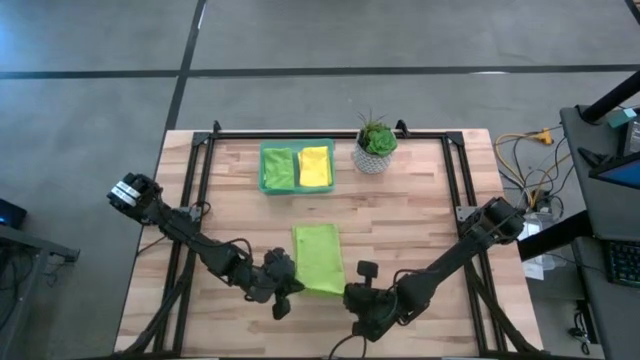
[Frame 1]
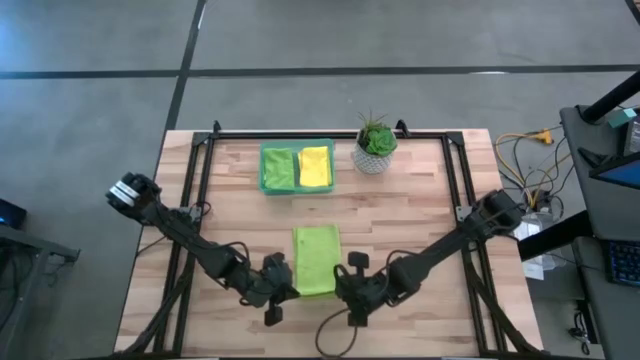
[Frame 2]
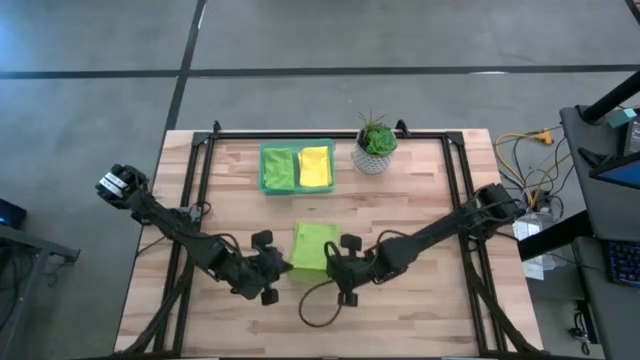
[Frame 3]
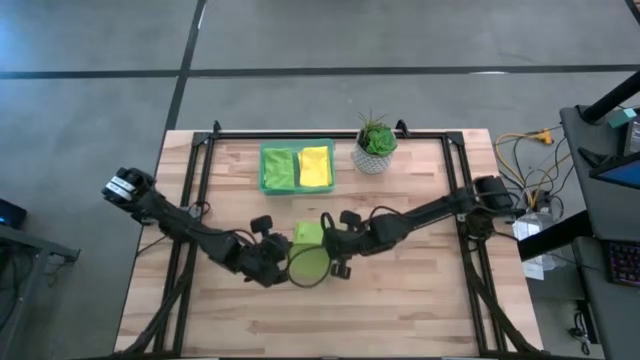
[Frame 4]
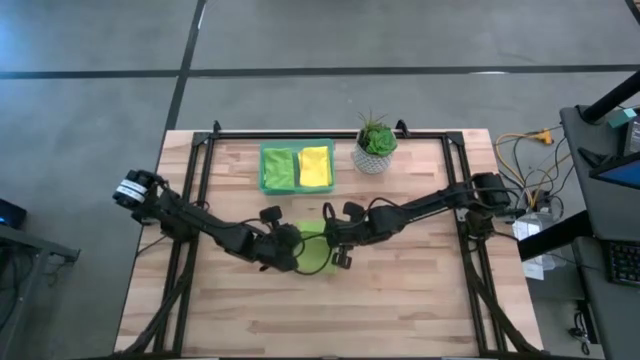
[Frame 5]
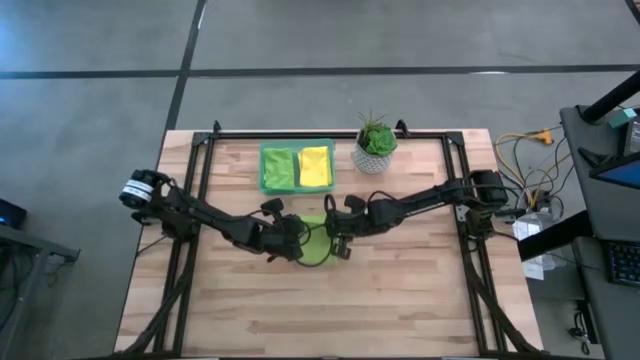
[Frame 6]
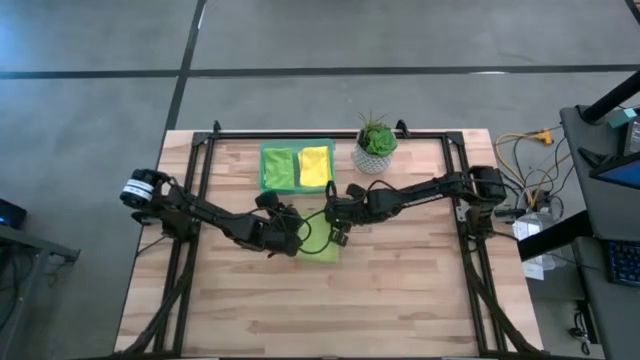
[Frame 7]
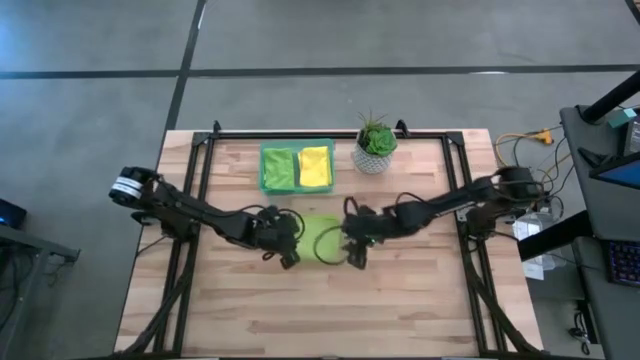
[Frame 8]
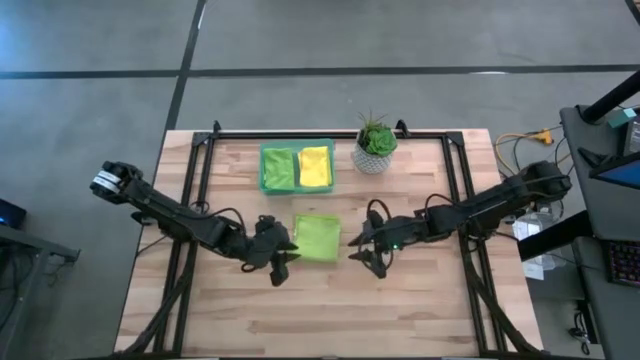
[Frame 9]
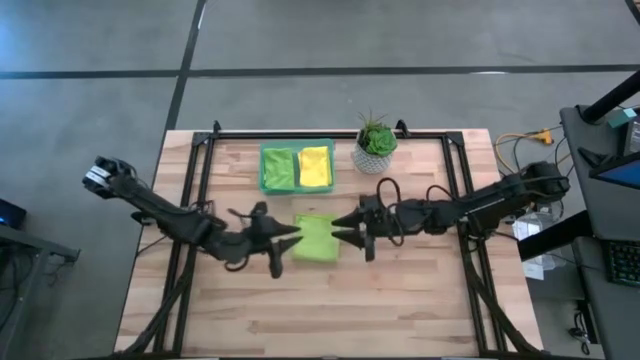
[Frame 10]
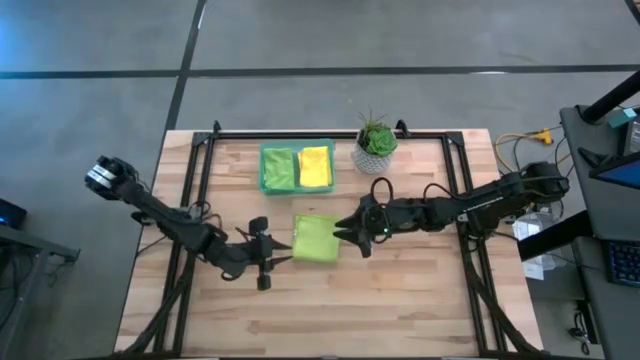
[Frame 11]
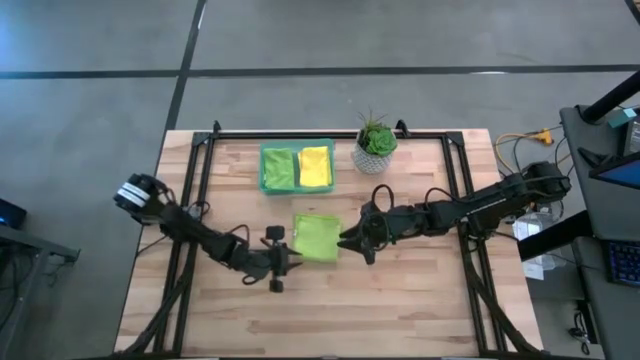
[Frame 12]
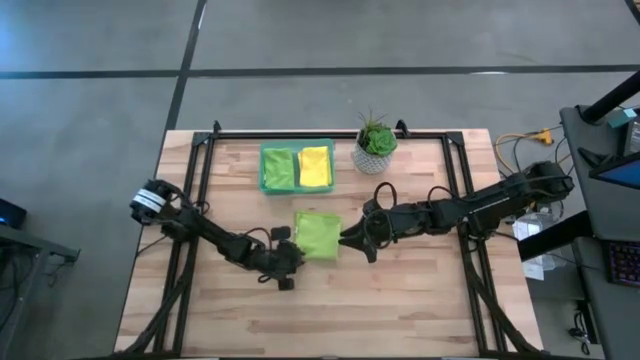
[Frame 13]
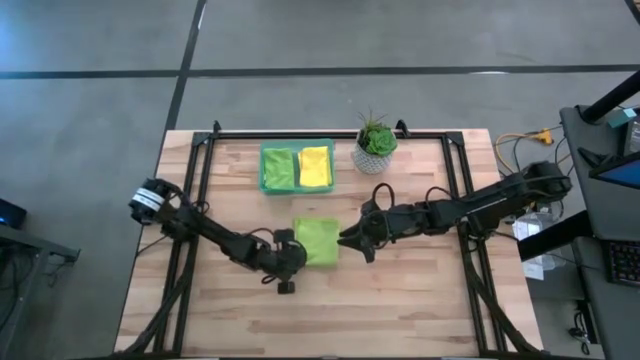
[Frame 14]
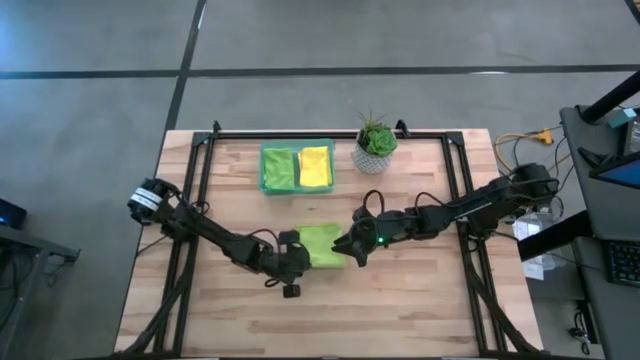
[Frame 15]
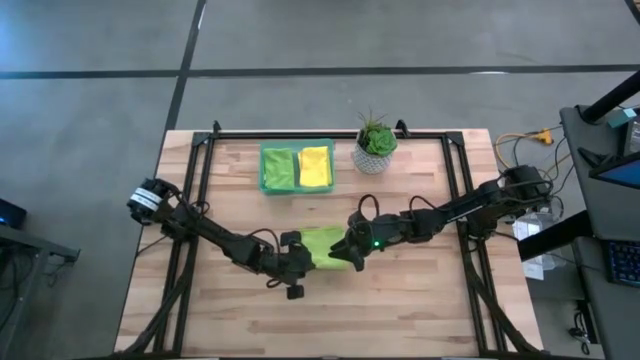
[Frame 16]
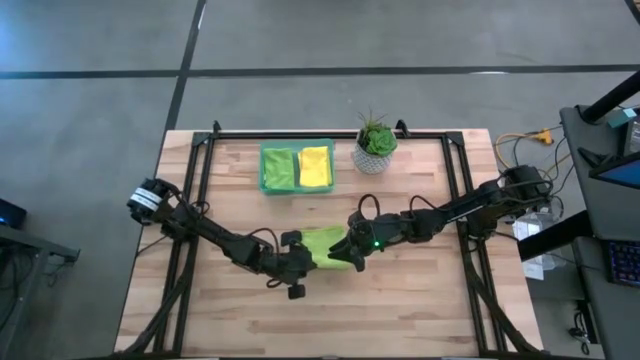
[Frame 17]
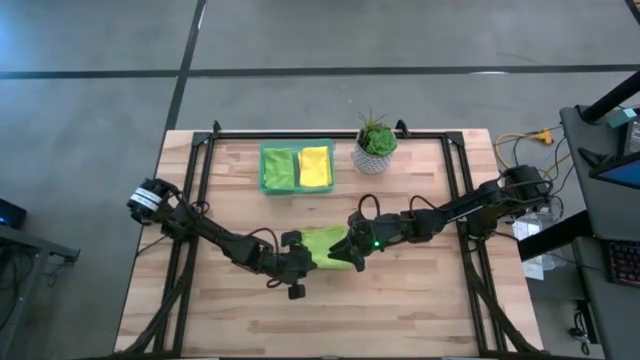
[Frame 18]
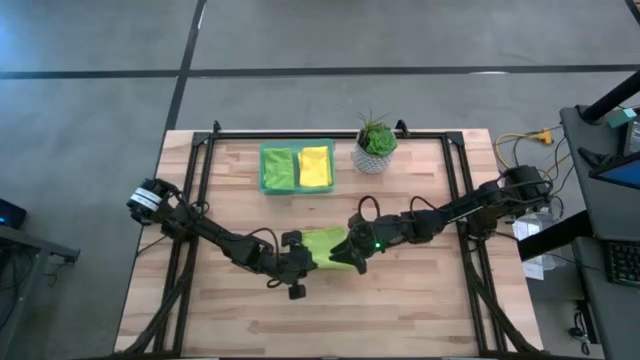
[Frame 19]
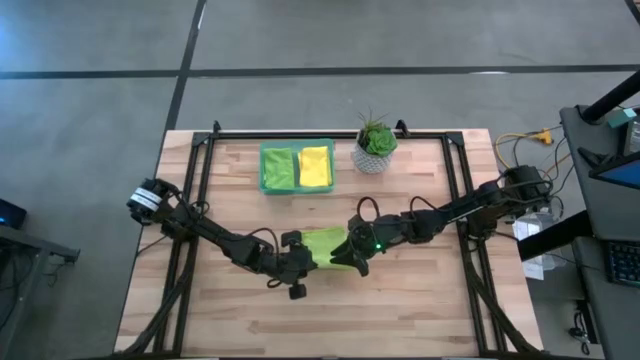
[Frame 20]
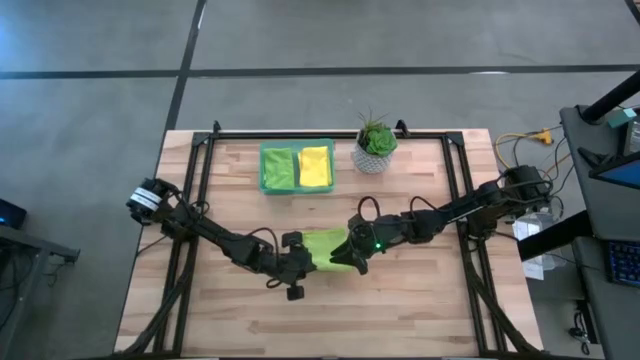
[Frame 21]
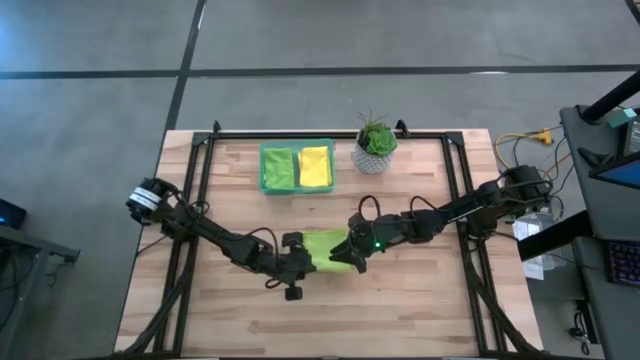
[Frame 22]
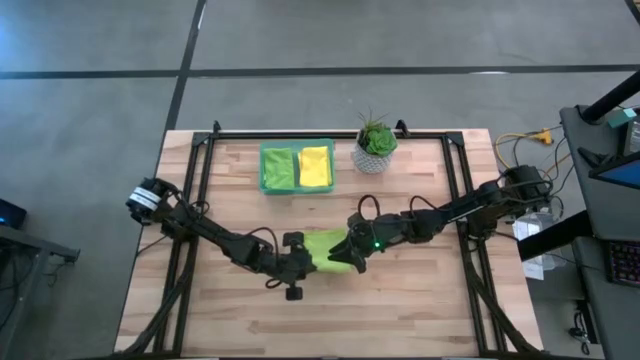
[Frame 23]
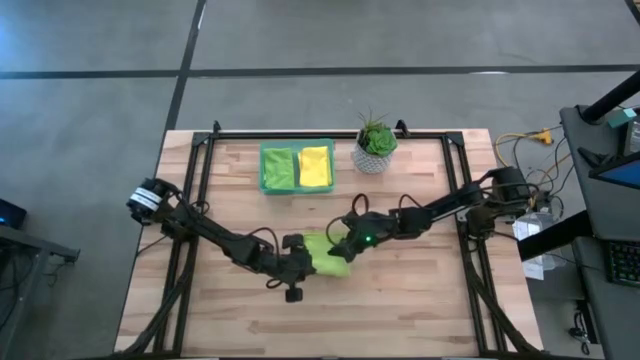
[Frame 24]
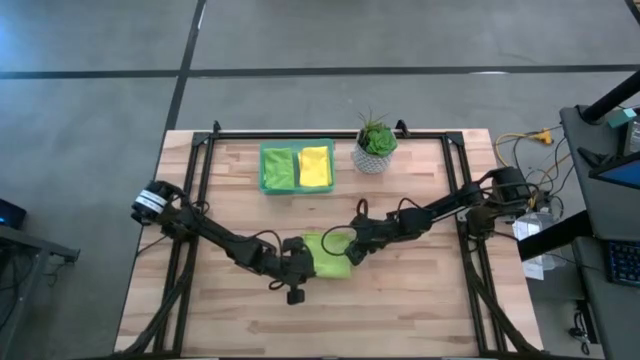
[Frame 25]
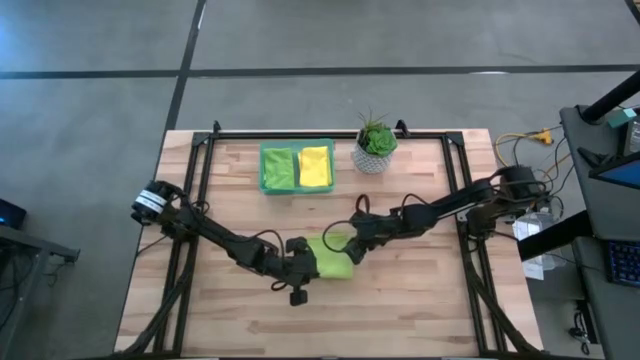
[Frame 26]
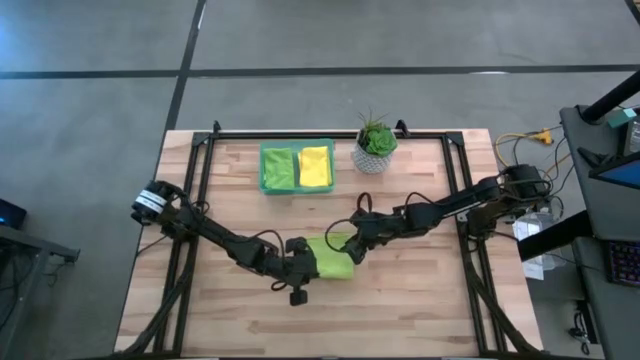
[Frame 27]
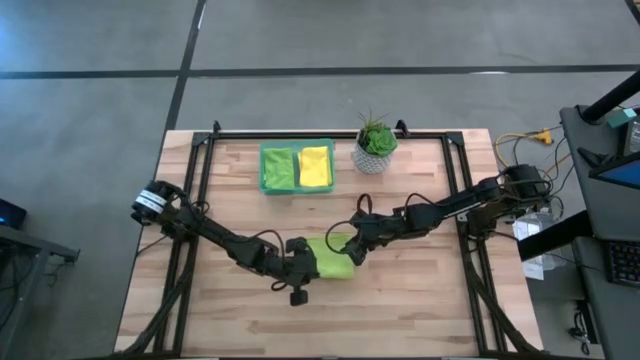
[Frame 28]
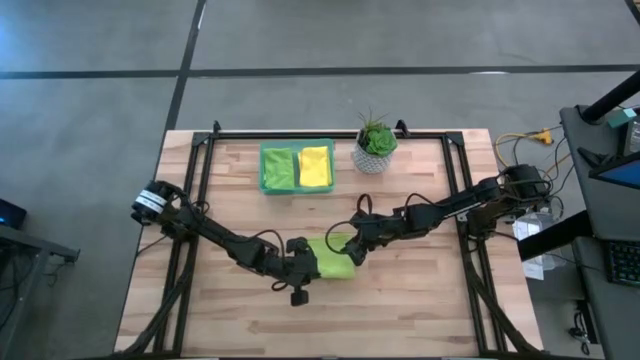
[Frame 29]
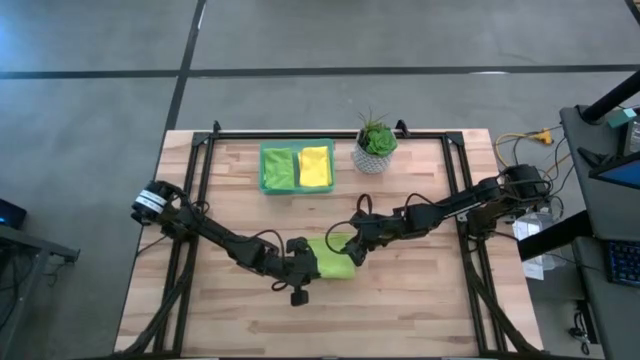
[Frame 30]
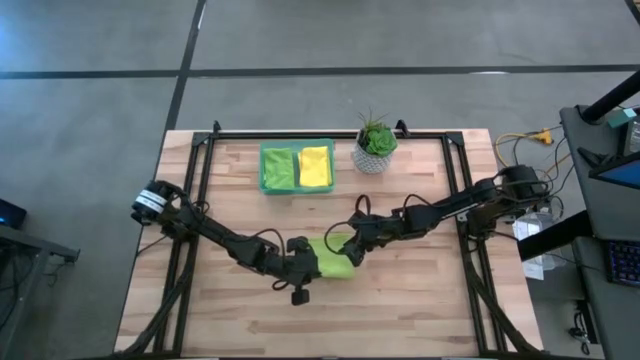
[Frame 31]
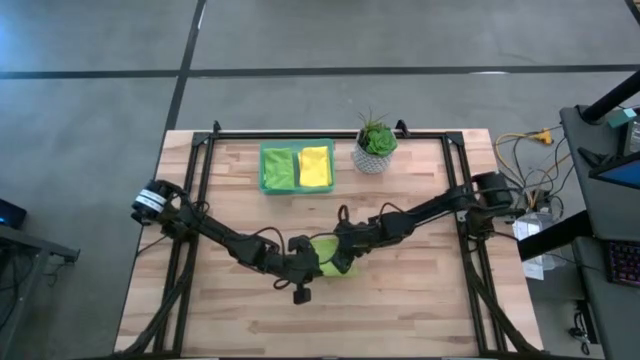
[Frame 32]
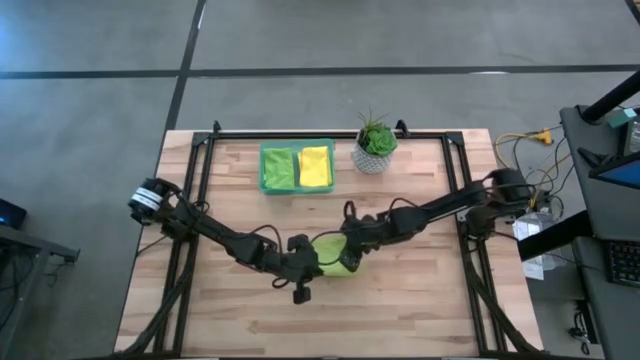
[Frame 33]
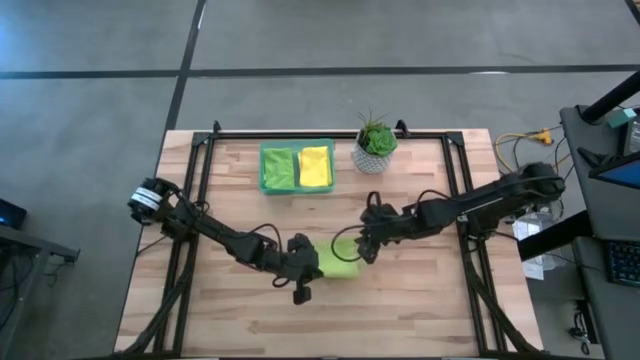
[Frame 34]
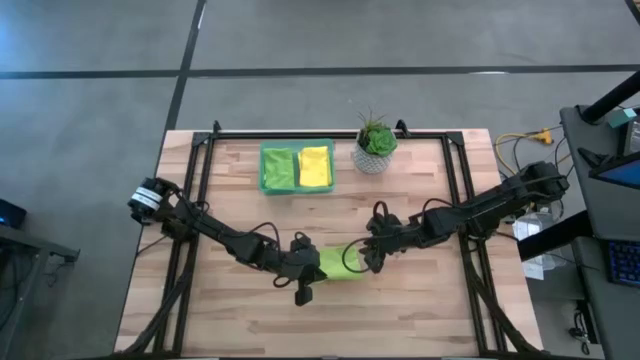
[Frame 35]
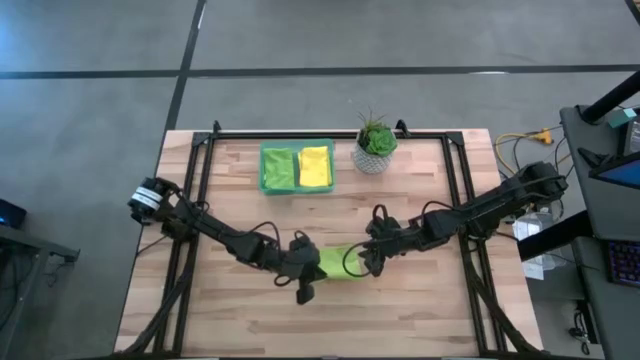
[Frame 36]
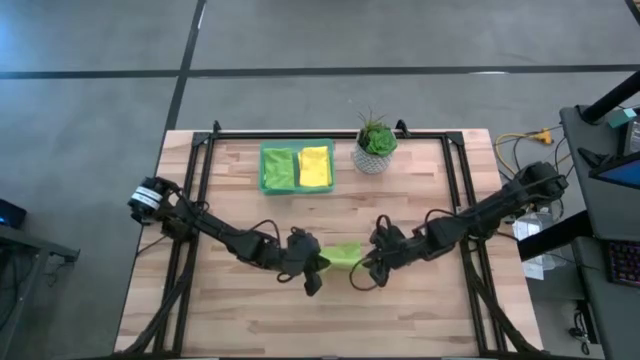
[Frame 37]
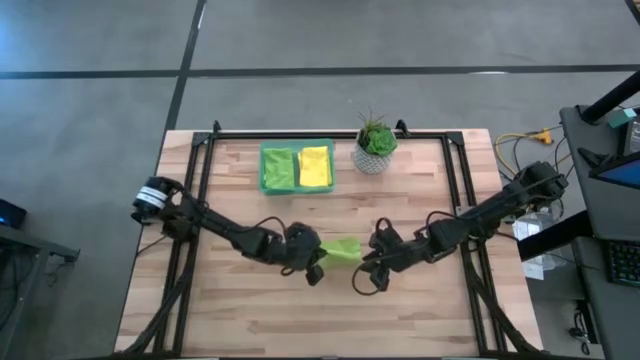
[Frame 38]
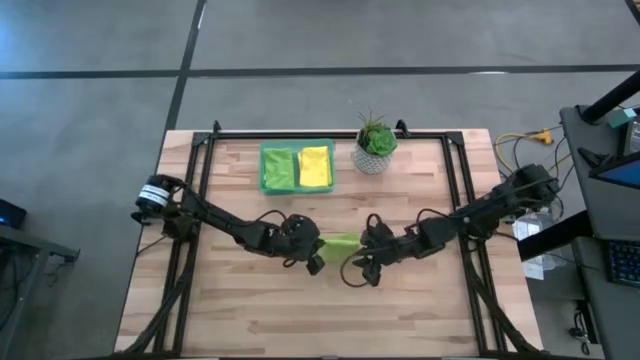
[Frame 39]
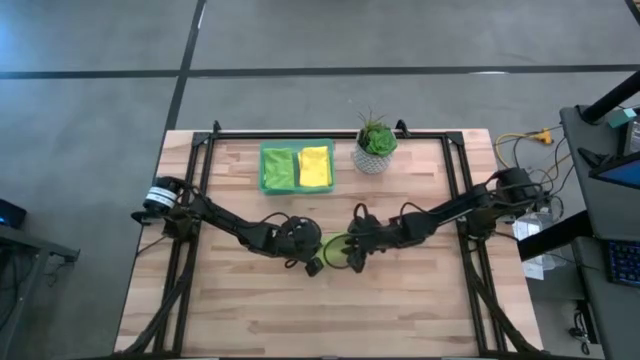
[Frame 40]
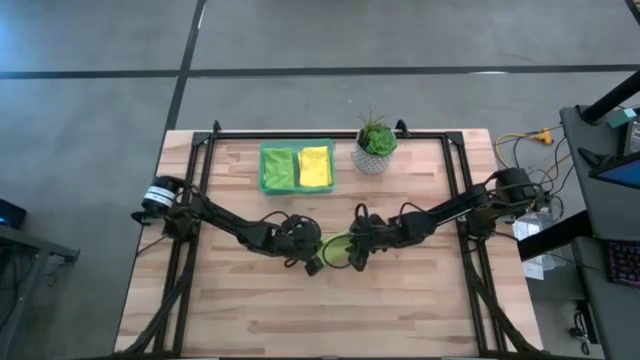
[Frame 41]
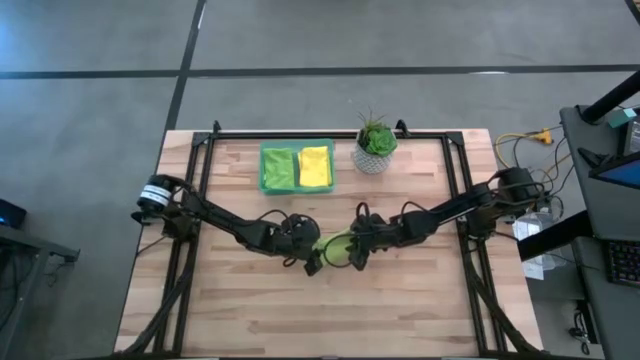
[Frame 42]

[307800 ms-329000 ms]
Task: Fold microfiber towels
Fold the light green microfiber towel
